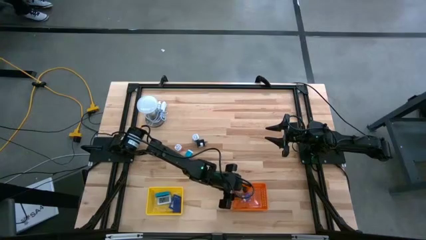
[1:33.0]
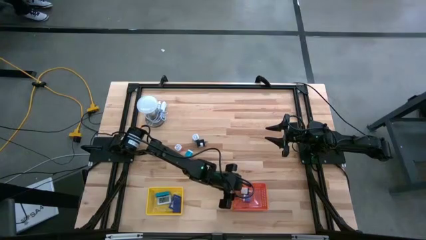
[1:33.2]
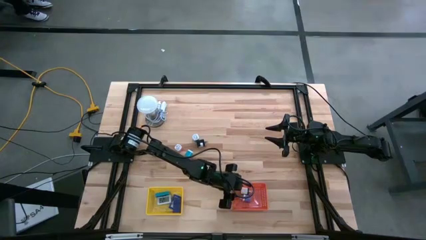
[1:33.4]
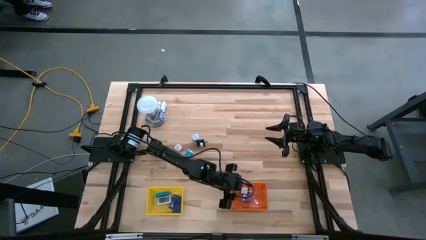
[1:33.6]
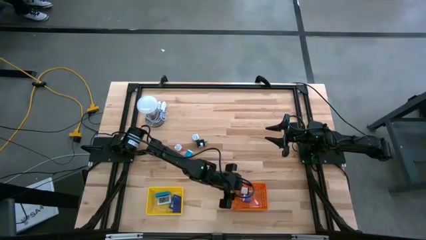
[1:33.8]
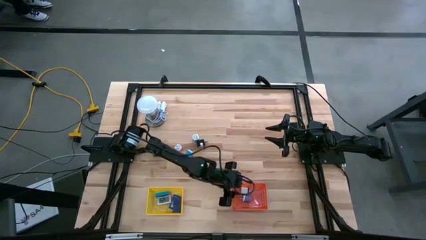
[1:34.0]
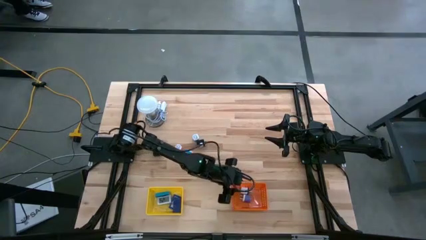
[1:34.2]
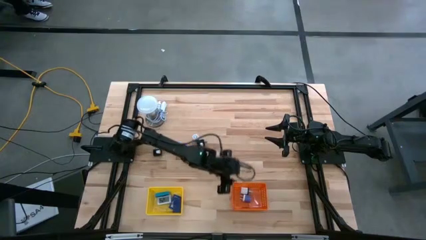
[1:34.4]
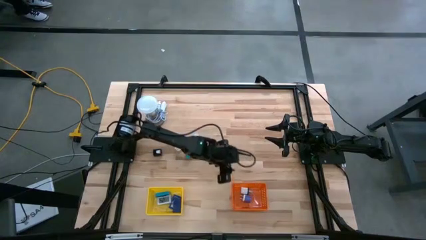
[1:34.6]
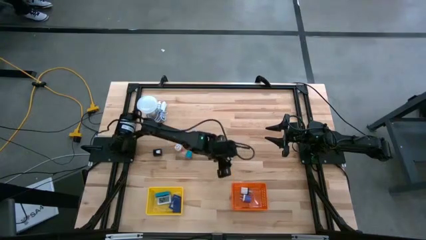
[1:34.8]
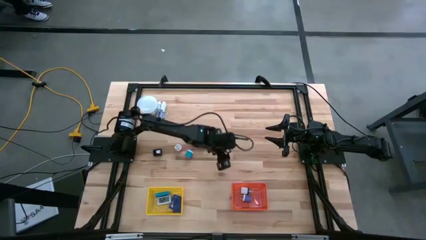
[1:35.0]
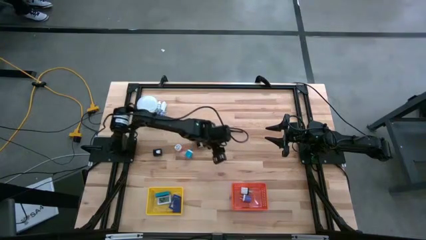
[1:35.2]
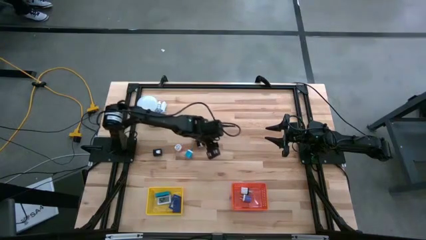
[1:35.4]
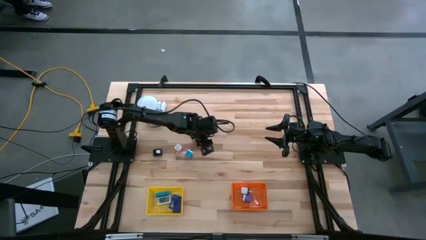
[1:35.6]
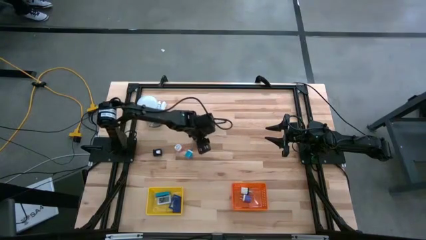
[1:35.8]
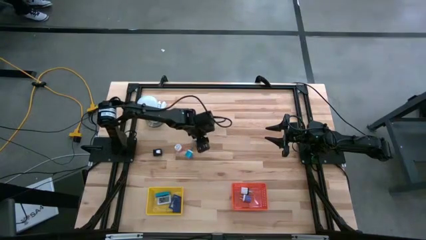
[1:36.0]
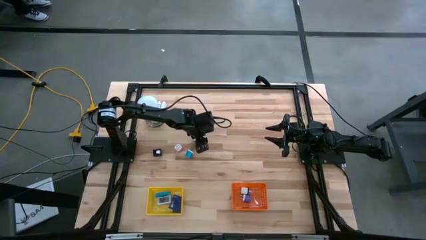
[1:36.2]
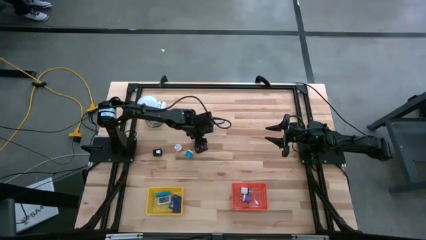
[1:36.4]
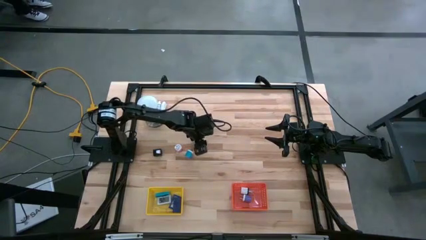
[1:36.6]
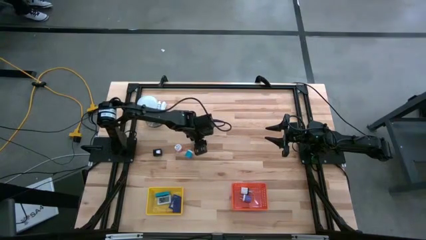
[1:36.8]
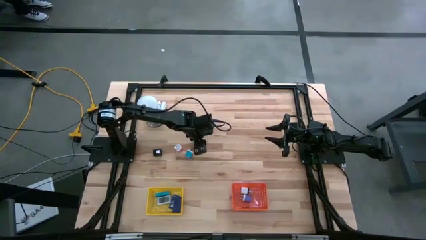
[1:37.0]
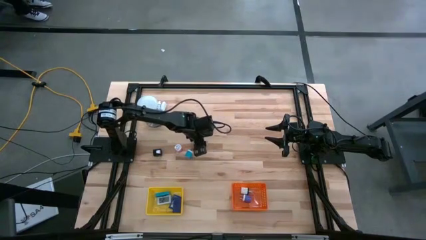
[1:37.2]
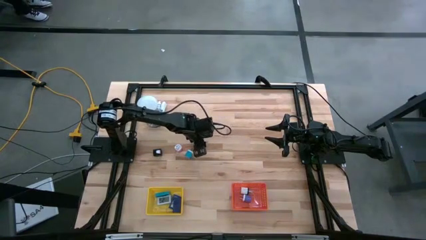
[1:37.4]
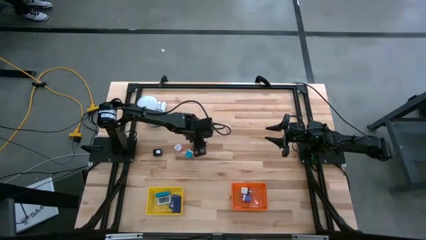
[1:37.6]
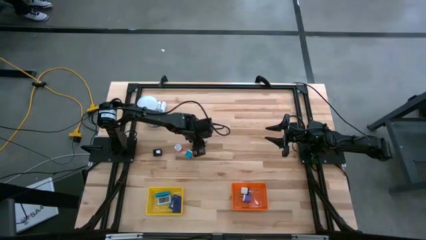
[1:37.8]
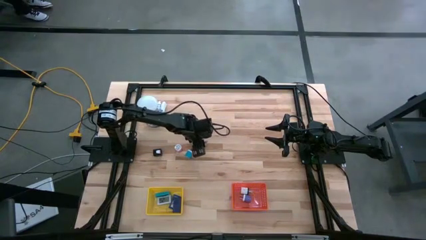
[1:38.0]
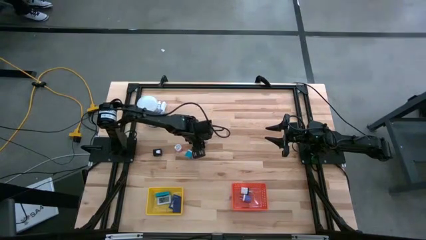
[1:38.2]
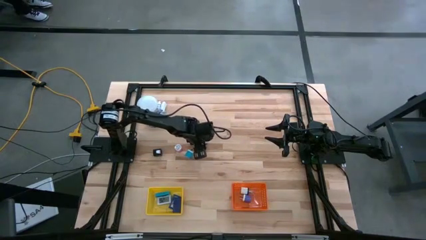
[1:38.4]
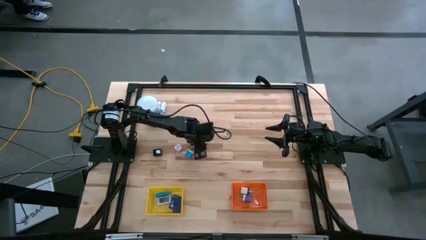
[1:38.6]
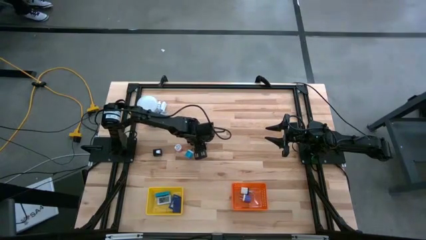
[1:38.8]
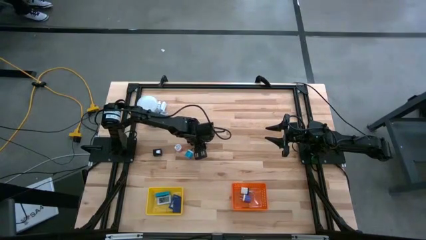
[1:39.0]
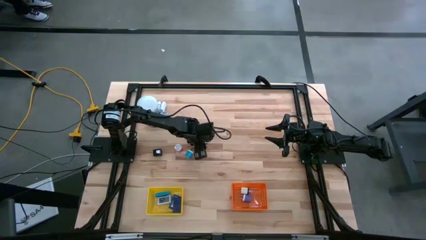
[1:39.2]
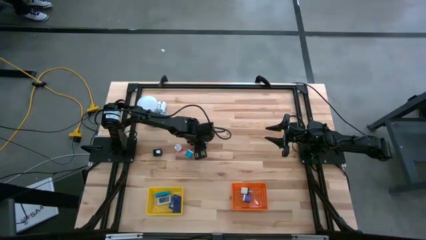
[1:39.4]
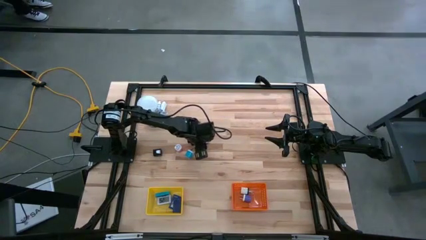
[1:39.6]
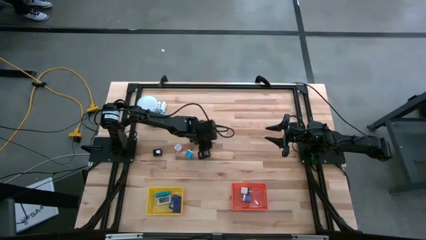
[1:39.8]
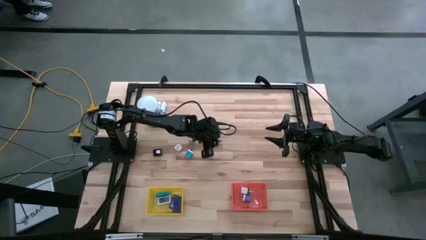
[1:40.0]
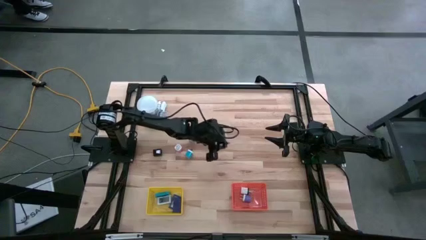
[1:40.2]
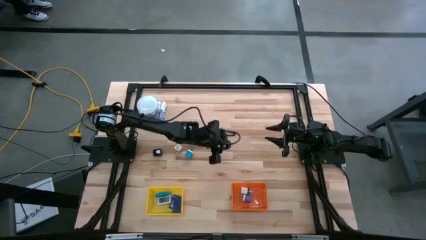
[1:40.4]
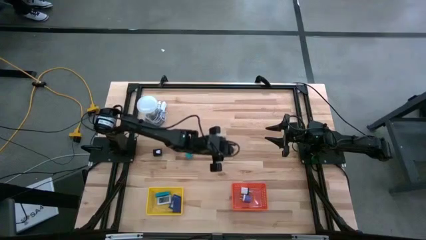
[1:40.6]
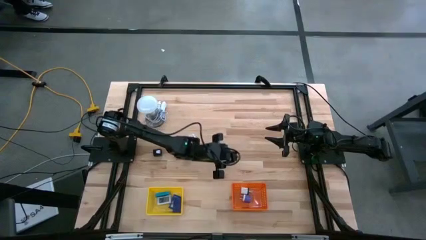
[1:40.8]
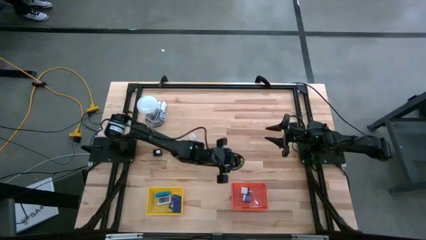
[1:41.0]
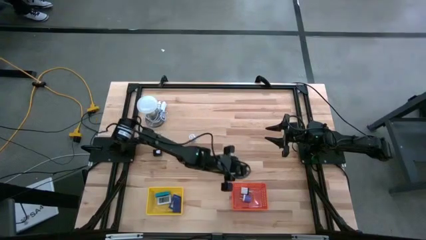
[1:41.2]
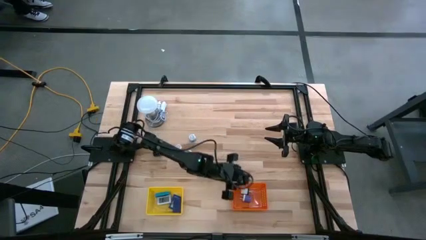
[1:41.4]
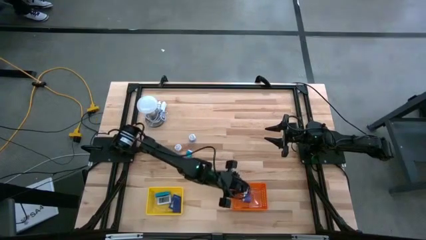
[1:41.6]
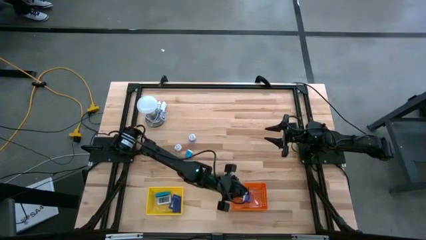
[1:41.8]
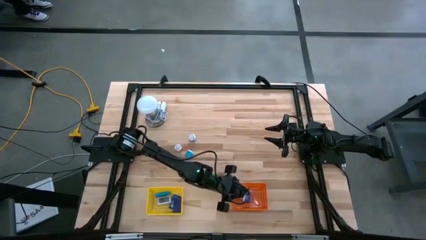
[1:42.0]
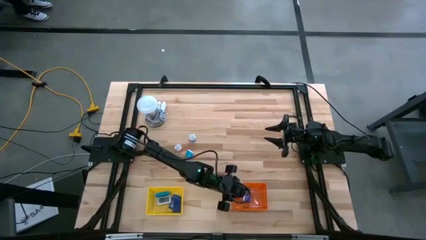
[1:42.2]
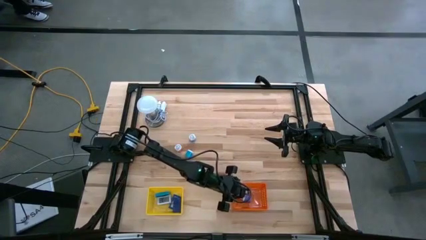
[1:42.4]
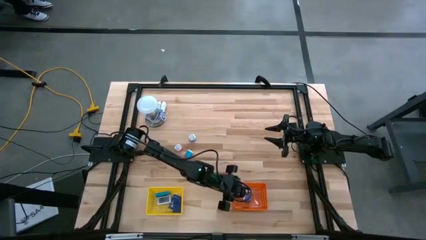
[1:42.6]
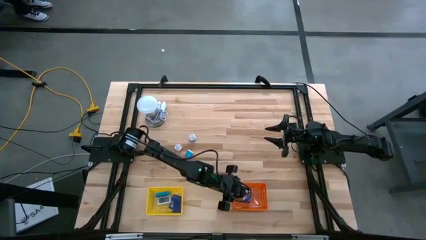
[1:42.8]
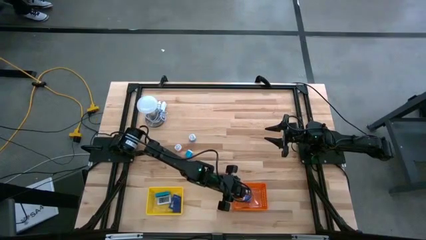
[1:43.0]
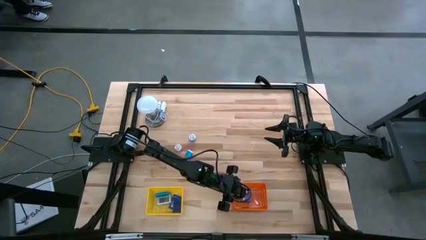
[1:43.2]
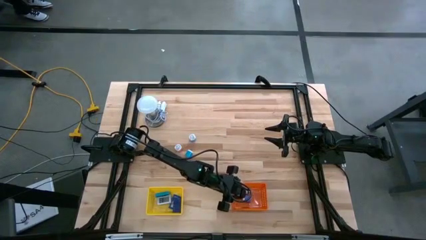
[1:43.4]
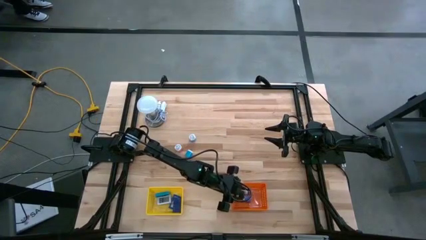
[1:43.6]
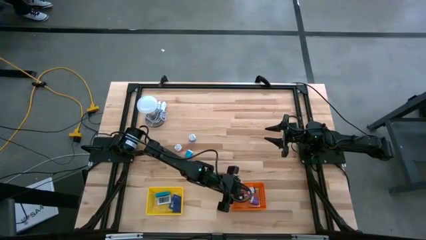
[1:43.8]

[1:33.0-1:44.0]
Task: Pick & Place Office items
Put the right black charger adapter into the orange bin

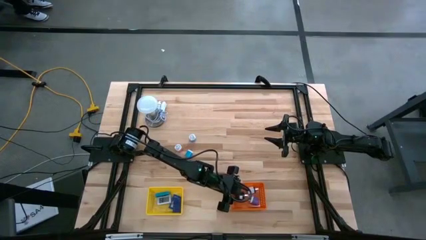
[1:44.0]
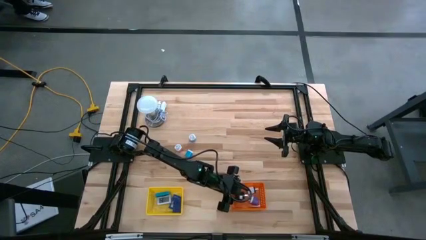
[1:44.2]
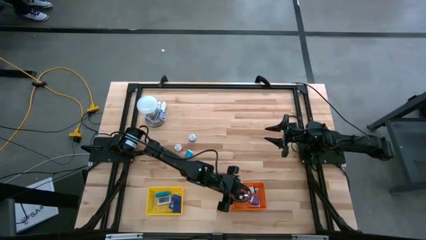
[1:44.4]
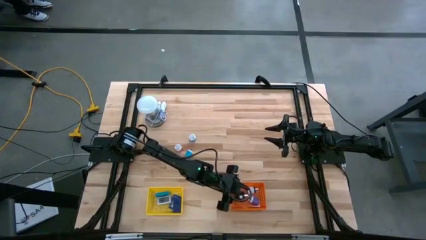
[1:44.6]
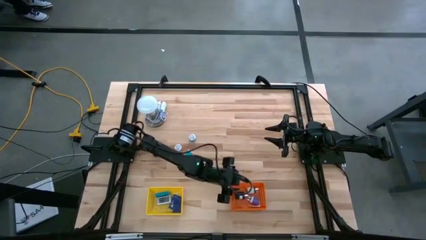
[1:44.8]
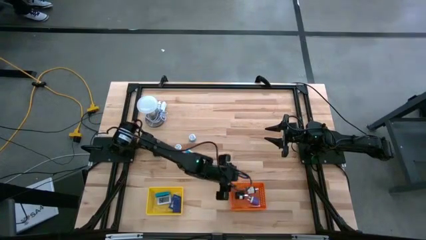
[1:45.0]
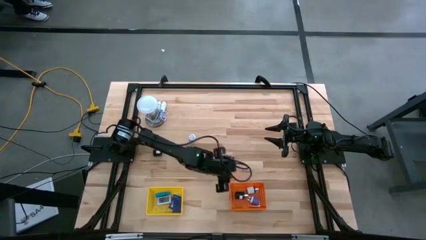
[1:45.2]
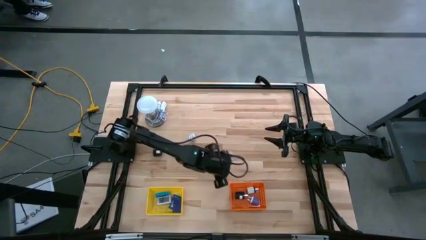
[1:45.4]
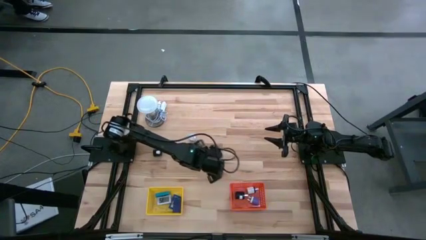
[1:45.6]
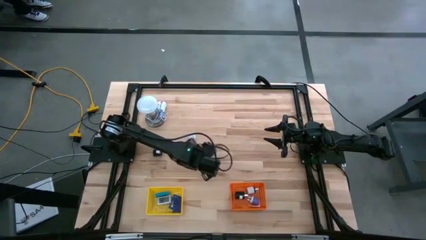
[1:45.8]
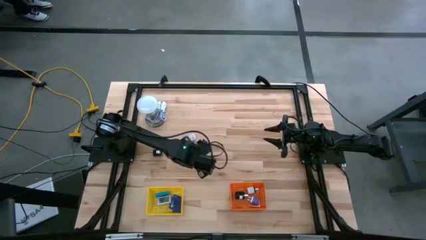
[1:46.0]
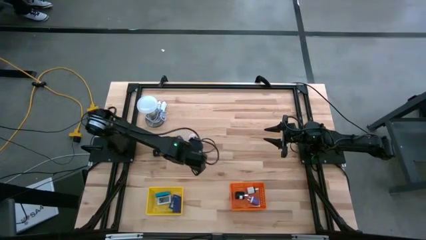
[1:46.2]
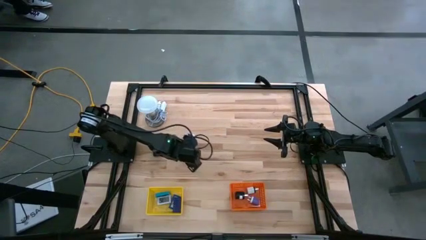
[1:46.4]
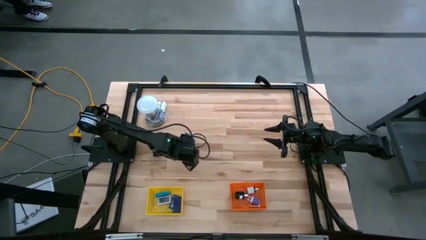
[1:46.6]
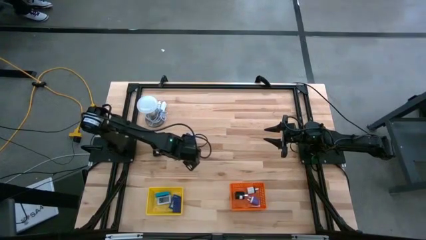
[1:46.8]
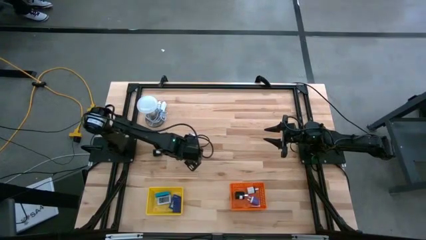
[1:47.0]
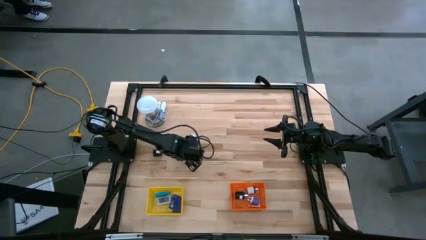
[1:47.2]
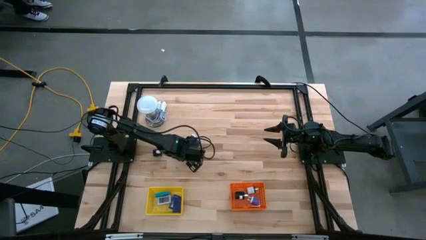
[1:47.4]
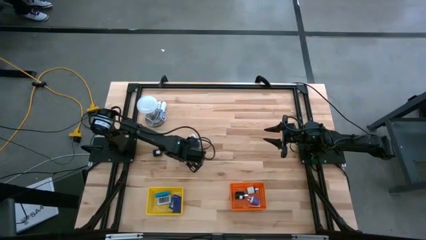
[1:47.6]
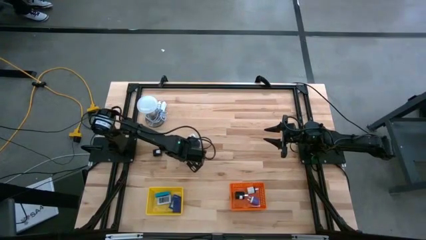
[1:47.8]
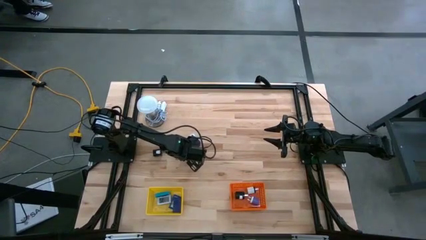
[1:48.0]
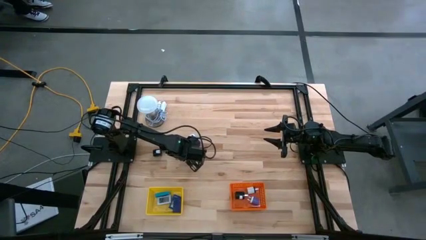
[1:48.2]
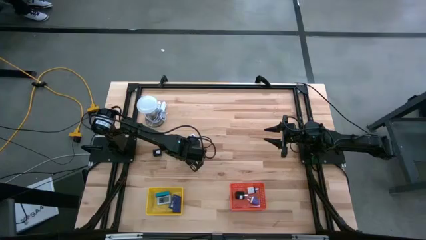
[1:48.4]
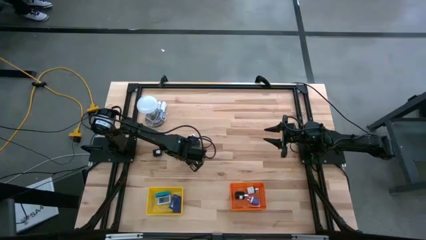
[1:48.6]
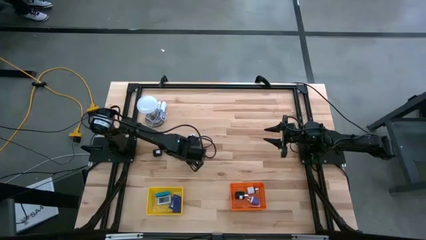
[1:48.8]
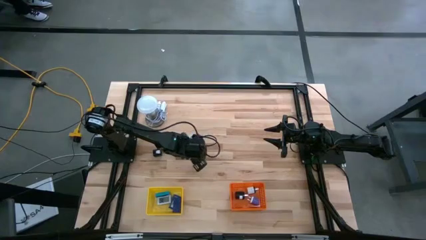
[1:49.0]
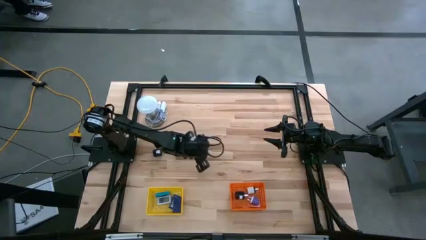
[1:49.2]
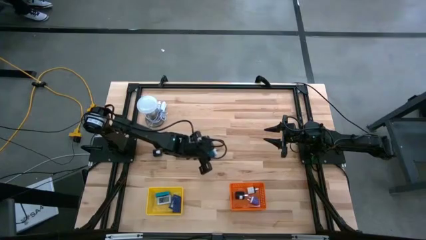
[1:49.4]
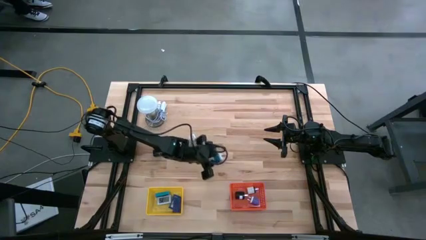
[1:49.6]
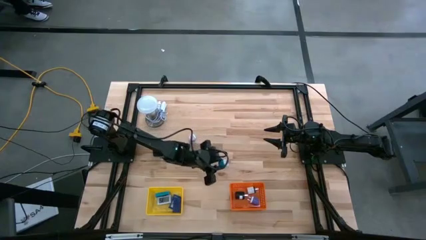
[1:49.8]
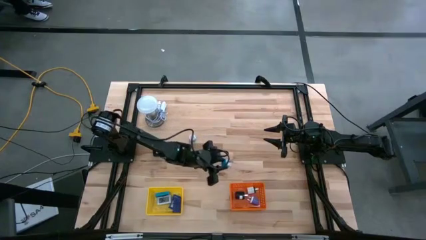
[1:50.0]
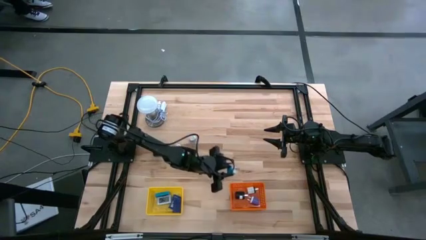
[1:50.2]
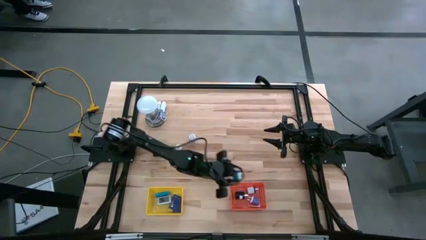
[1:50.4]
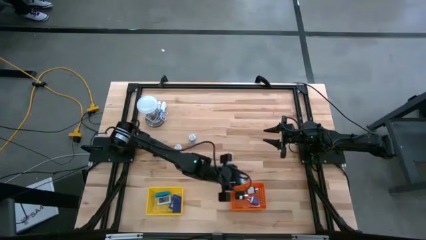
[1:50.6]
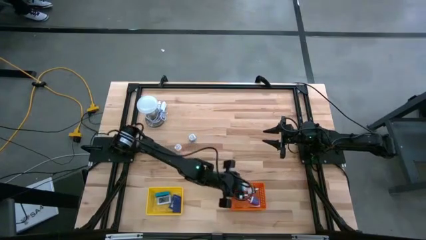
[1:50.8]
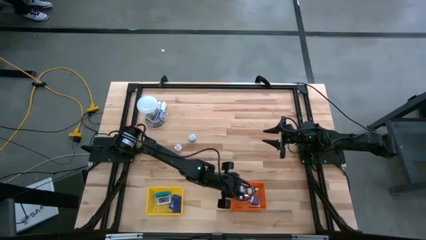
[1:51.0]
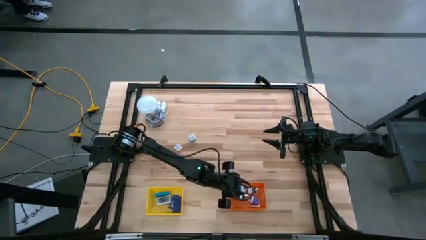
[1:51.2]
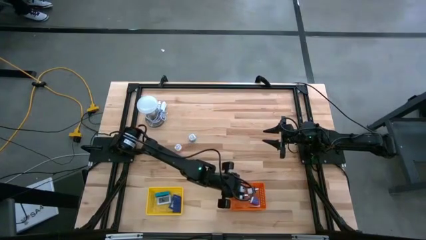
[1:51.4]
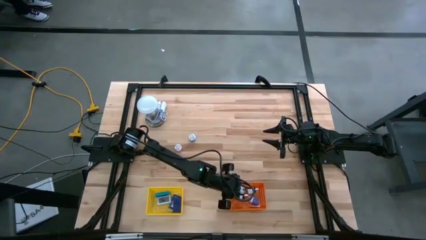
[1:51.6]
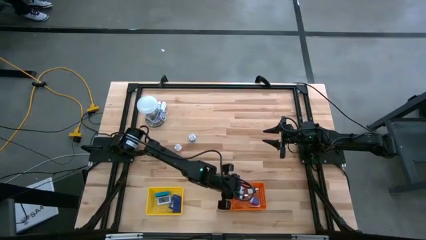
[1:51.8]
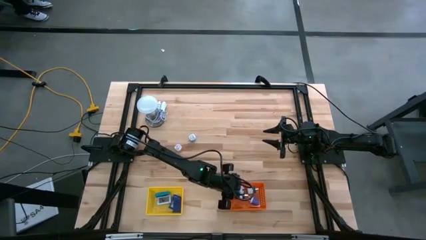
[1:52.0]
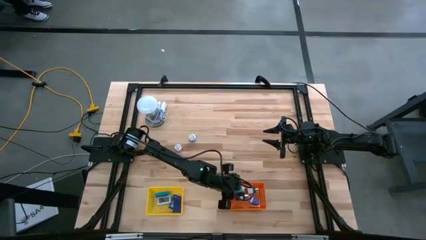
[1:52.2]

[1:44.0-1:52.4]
Put the bottom light blue charger adapter into the orange bin
